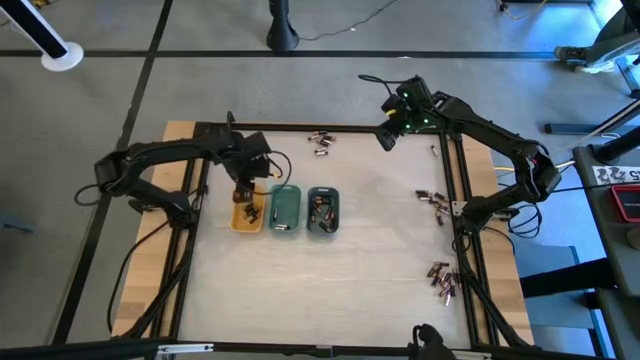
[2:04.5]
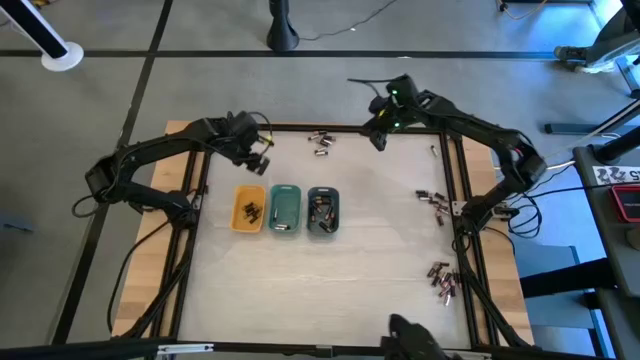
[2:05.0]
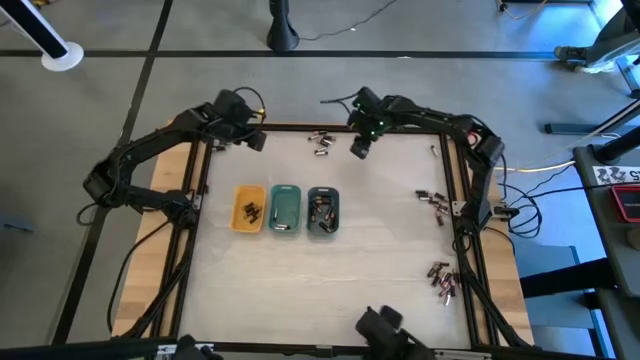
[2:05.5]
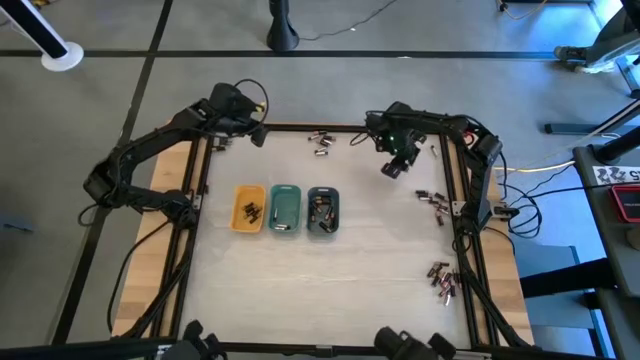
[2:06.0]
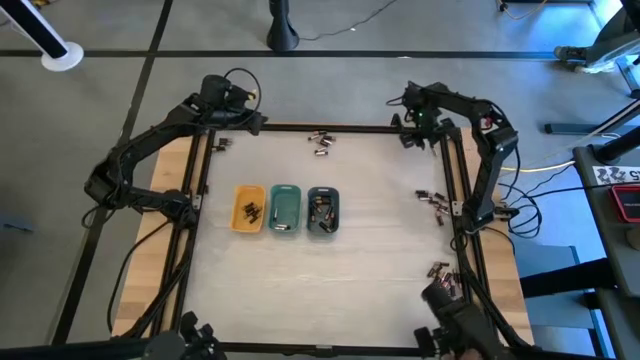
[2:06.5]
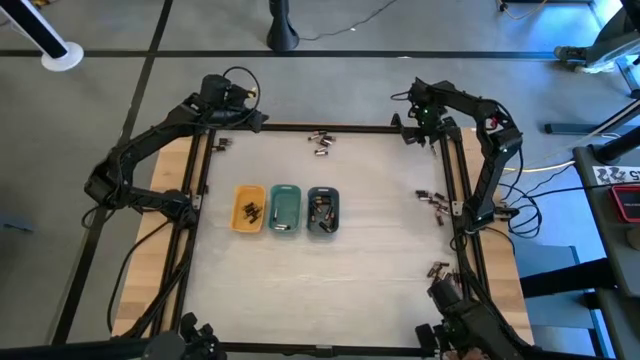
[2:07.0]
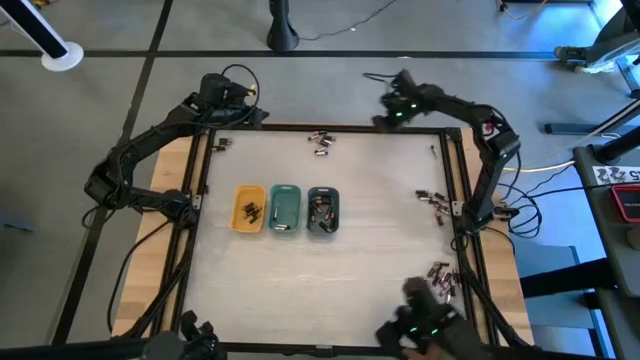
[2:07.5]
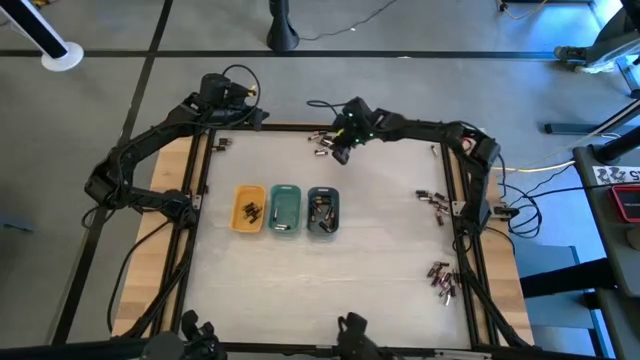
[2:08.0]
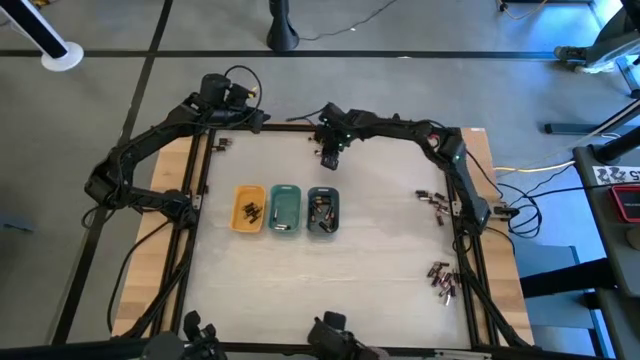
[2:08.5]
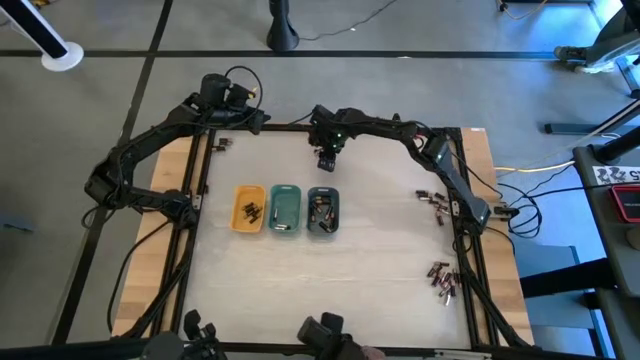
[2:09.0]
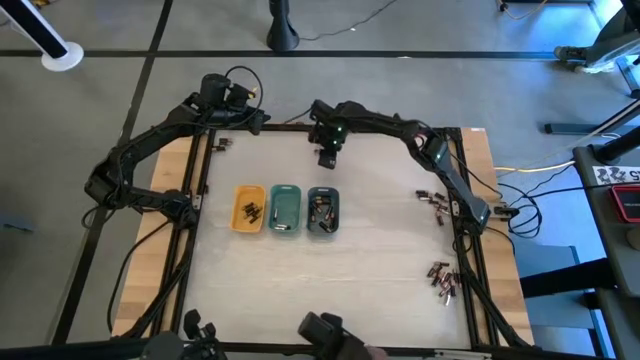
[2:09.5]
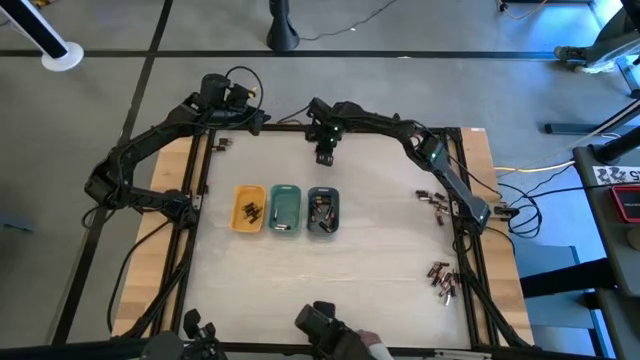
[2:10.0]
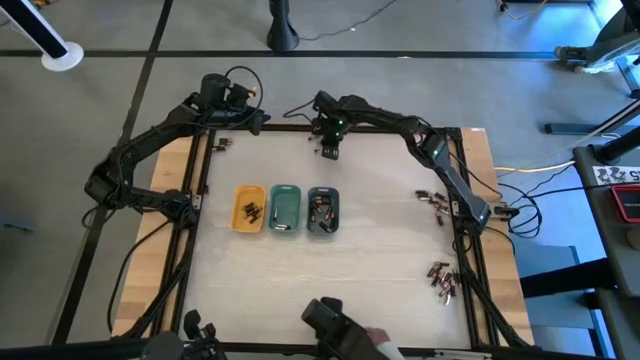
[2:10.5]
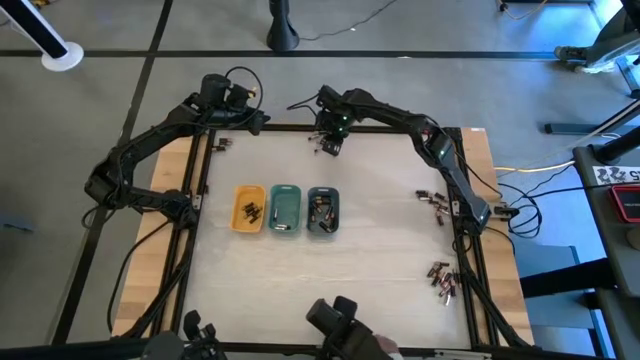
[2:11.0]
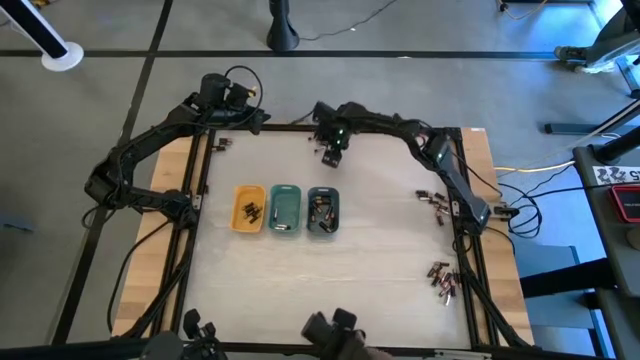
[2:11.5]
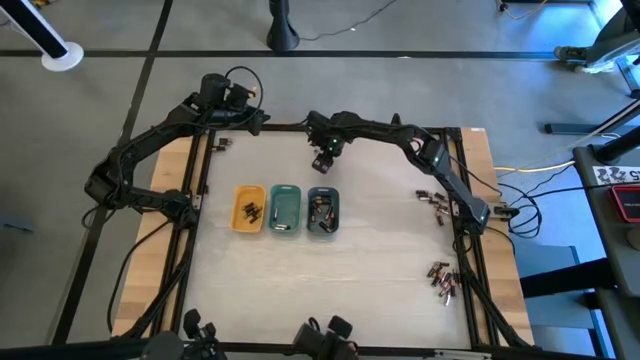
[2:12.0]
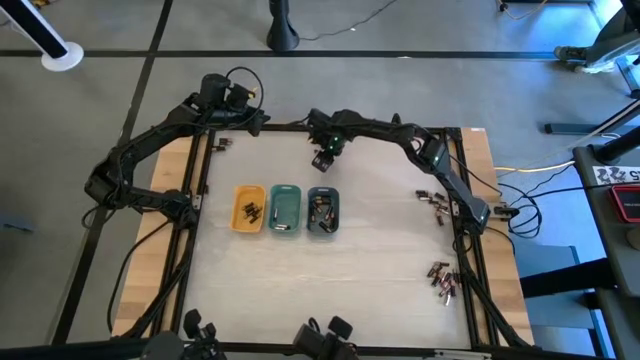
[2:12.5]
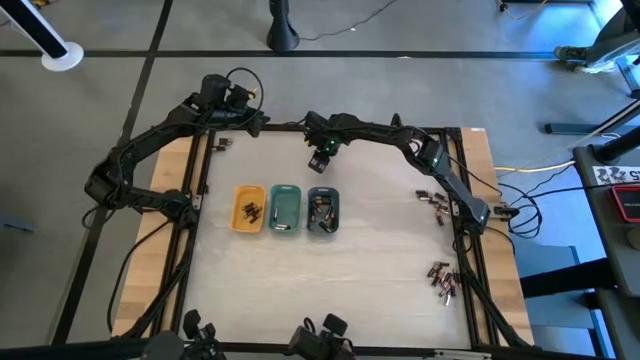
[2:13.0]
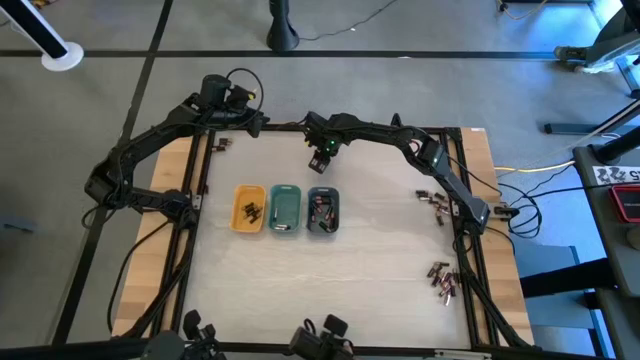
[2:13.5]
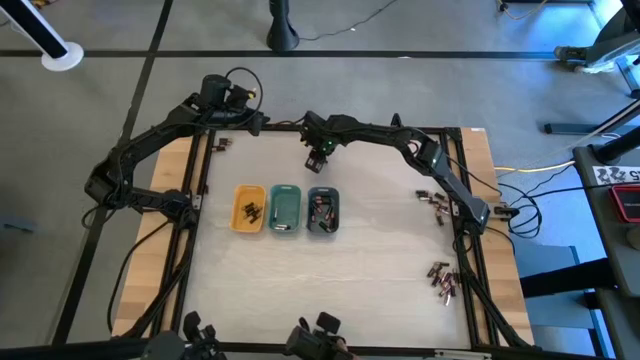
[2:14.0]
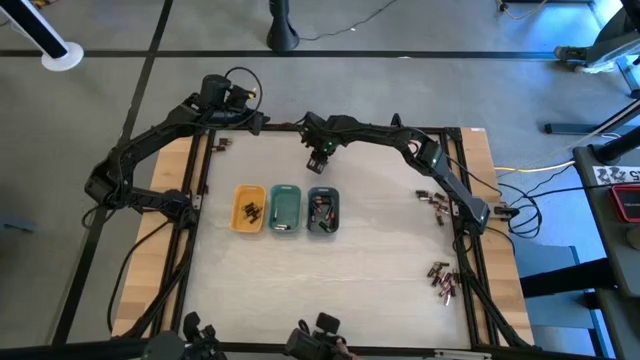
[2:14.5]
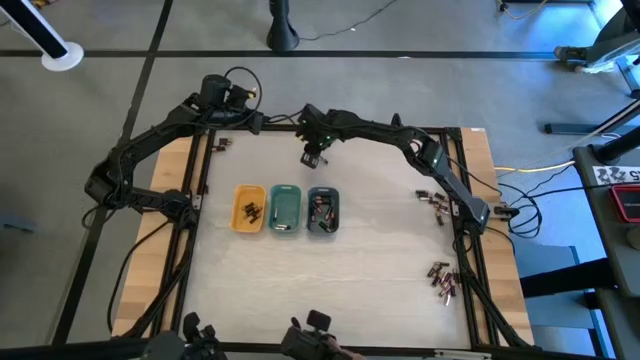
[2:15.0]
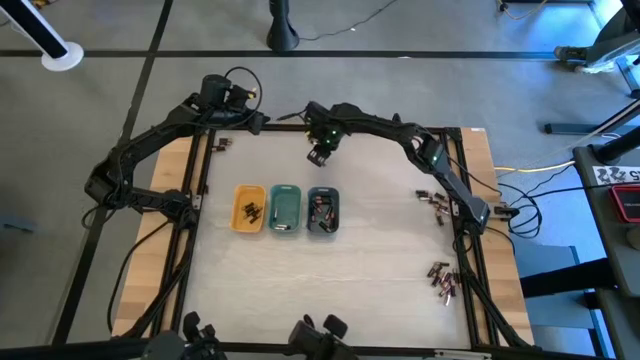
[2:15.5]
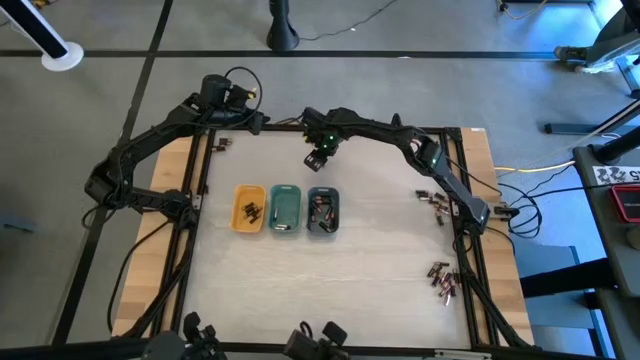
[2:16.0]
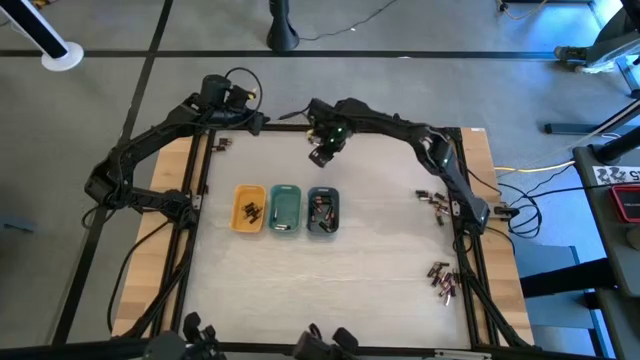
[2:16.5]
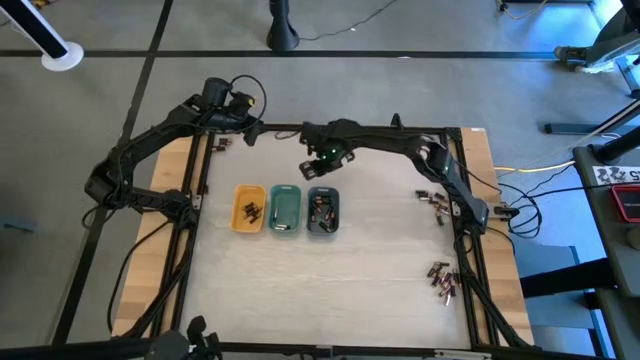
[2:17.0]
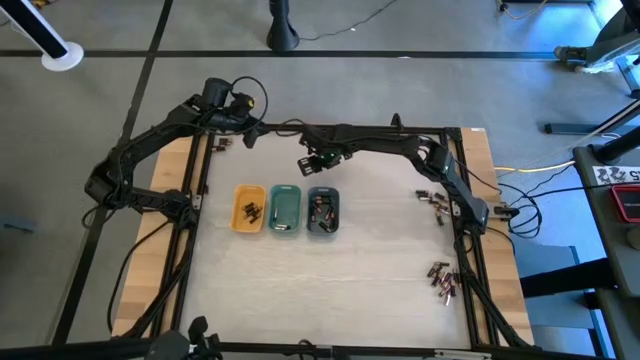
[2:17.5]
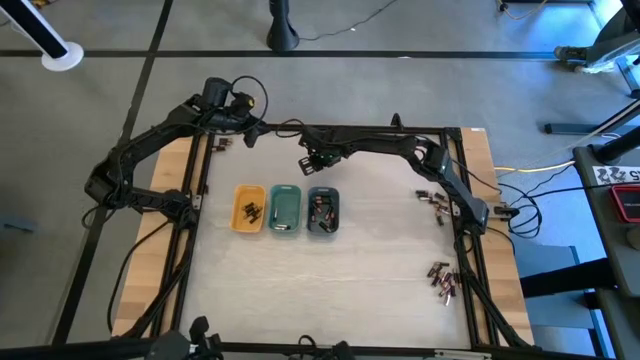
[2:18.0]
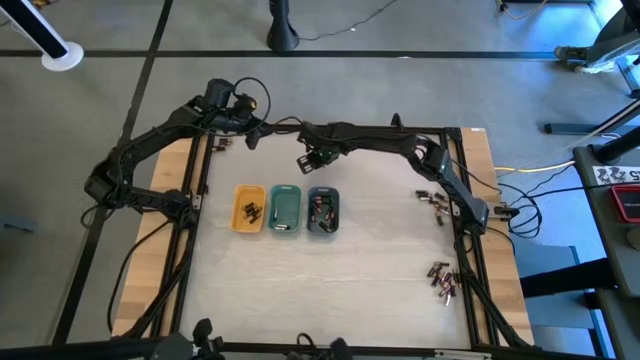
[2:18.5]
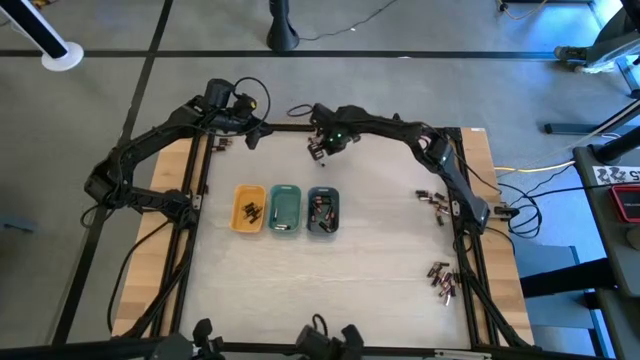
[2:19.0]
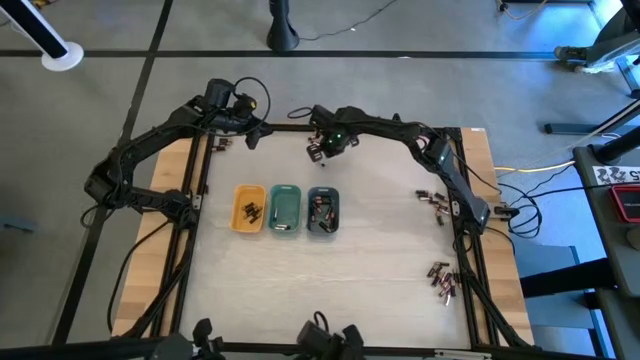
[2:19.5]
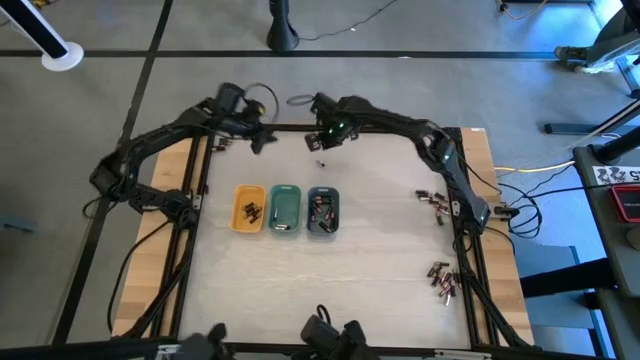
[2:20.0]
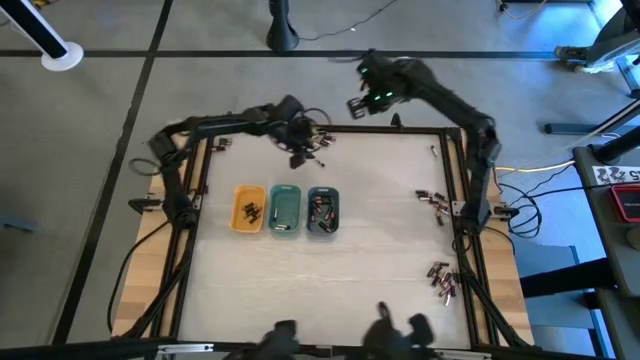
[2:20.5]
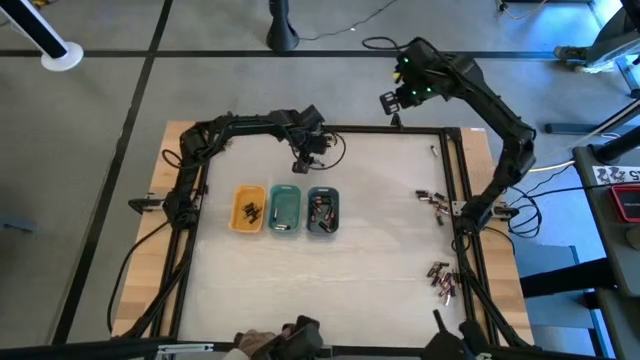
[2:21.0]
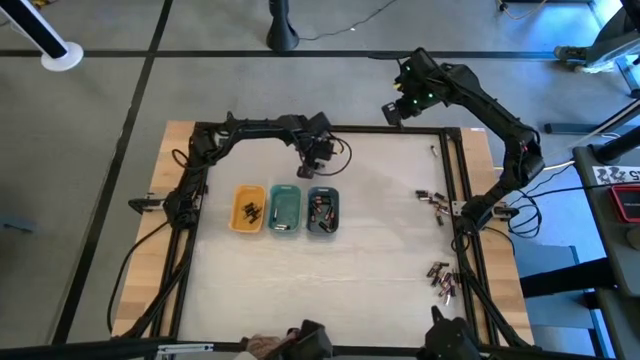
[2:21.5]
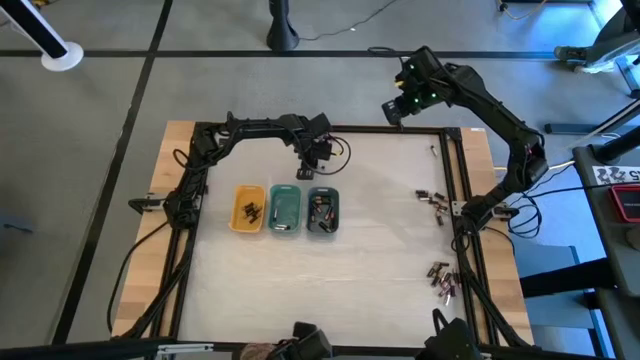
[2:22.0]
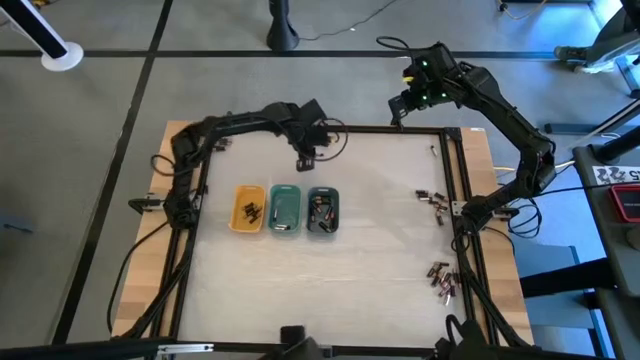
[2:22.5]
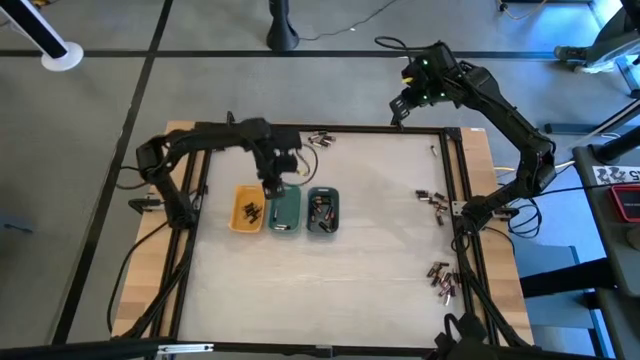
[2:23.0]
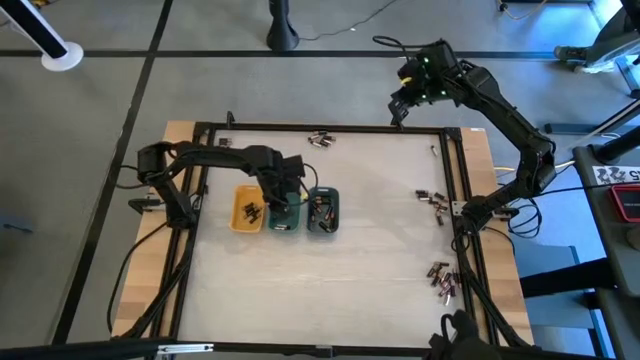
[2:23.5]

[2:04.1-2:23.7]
Task: Sort batteries
Put the silver battery into the green bin

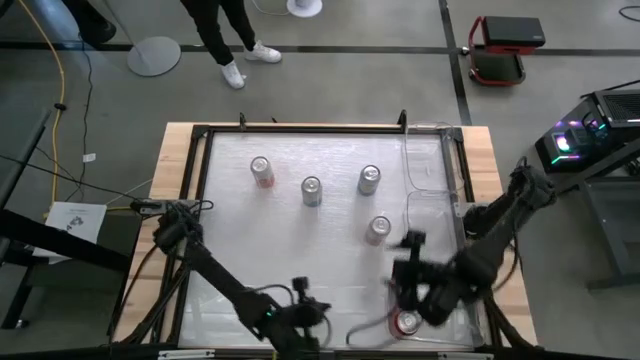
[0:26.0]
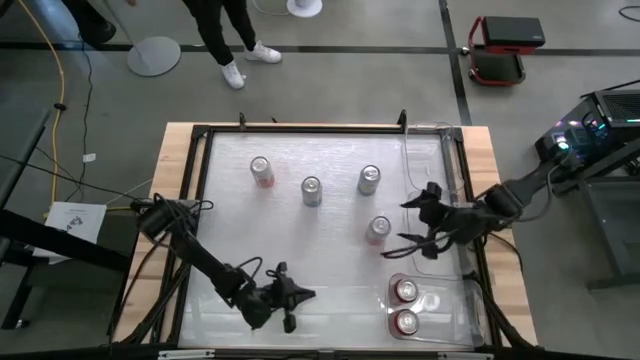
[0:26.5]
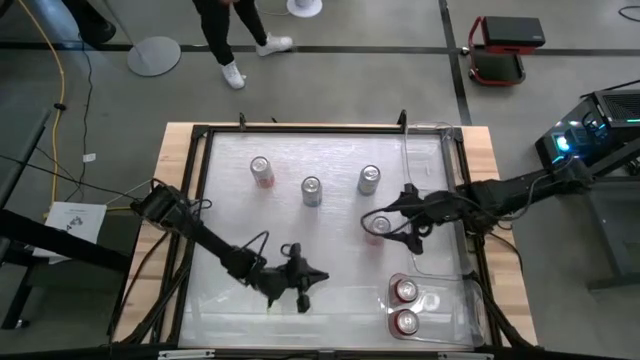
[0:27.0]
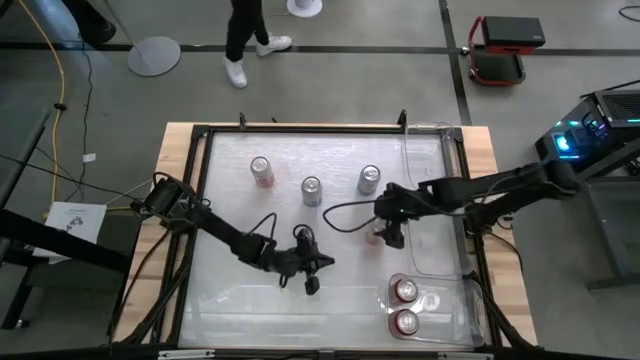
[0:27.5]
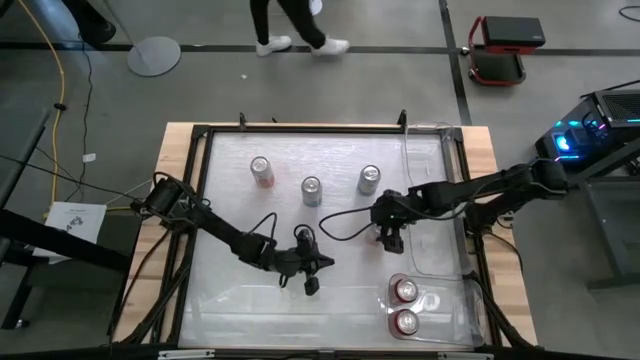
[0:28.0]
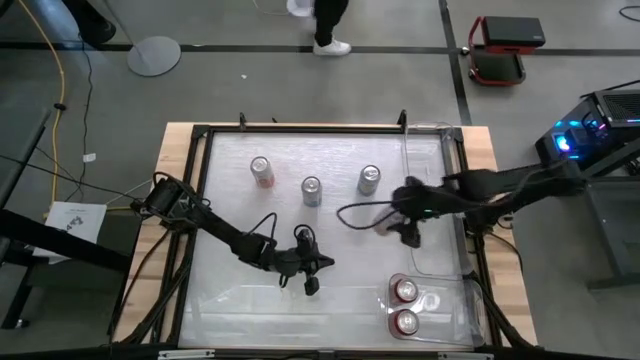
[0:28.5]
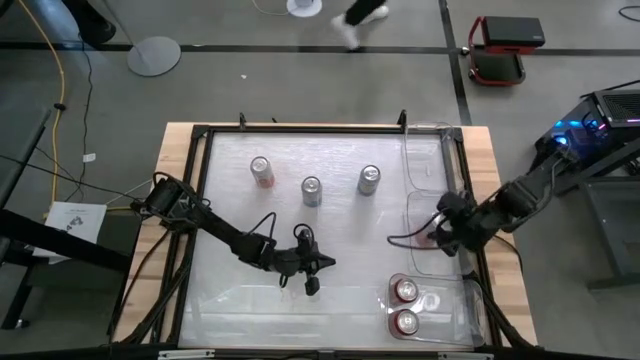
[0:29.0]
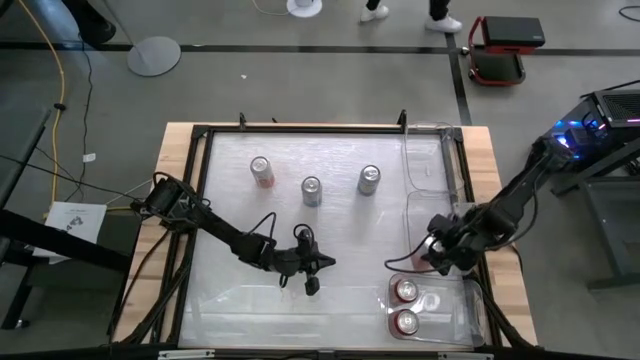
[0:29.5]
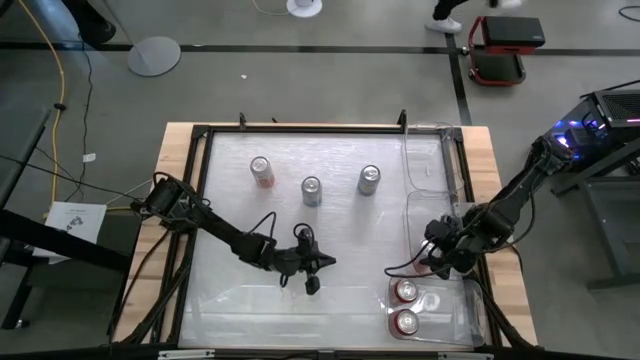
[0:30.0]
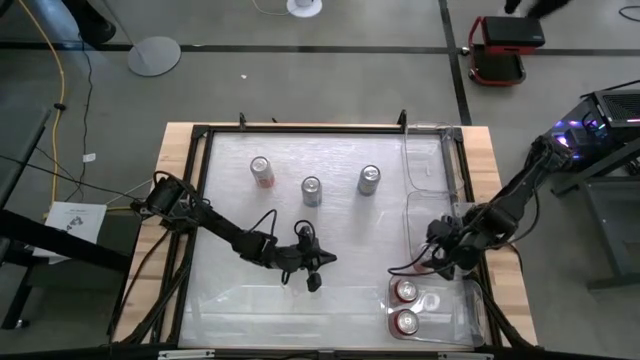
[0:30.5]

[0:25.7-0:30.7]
Task: Sort soda cans
Put the right orange-white soda can into the center transparent bin
